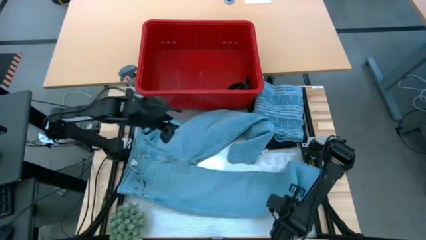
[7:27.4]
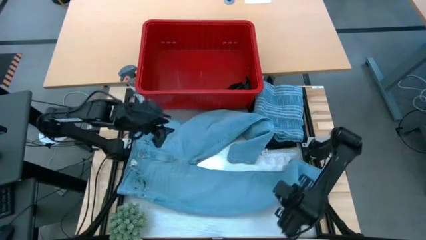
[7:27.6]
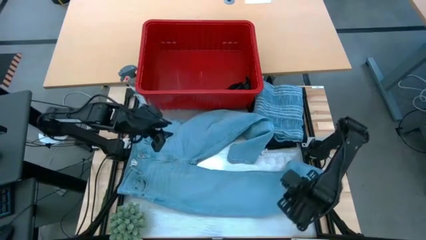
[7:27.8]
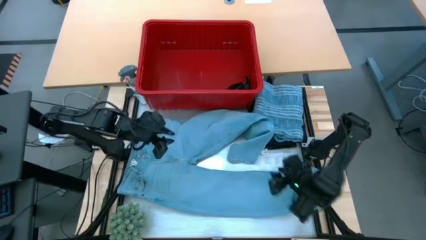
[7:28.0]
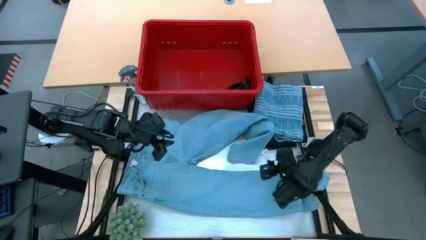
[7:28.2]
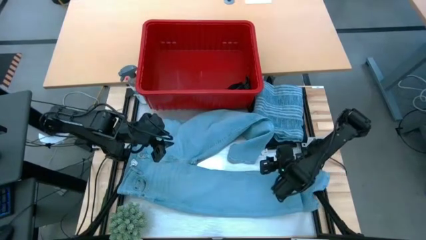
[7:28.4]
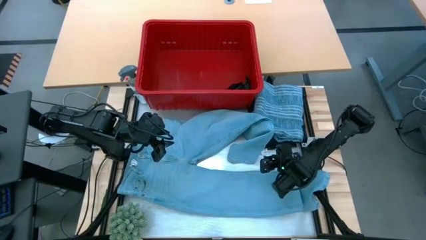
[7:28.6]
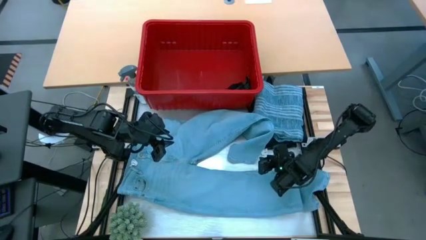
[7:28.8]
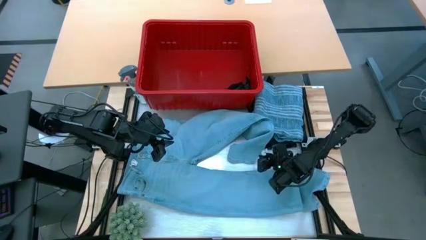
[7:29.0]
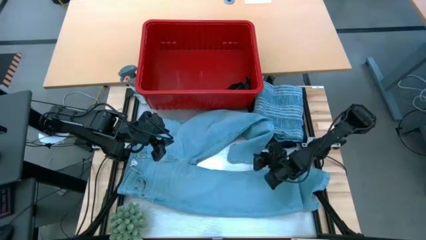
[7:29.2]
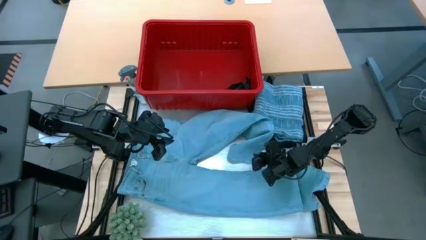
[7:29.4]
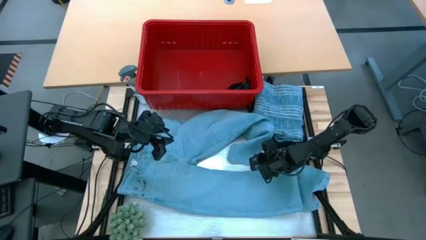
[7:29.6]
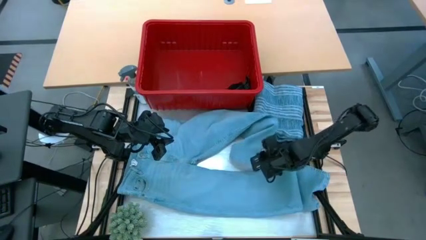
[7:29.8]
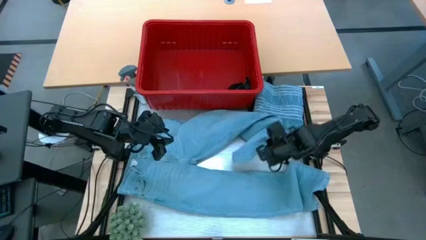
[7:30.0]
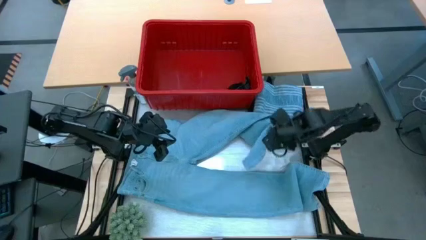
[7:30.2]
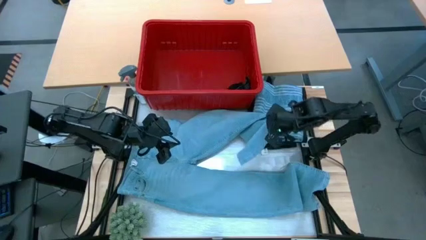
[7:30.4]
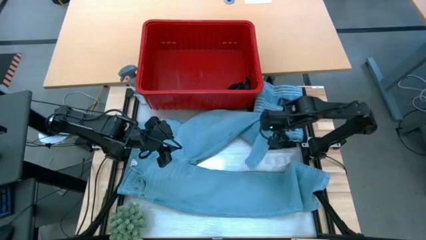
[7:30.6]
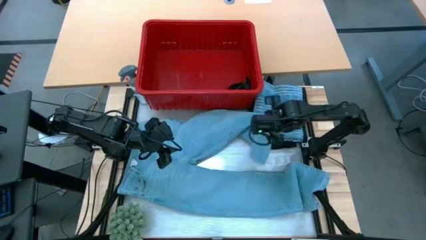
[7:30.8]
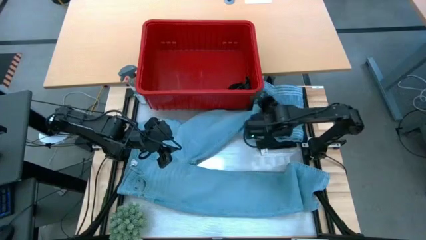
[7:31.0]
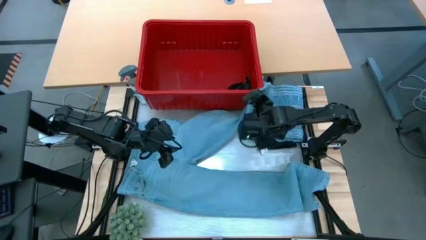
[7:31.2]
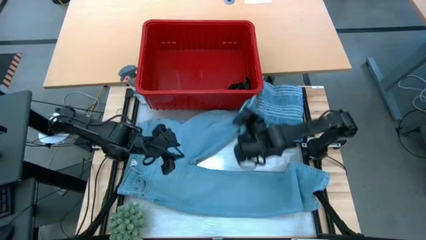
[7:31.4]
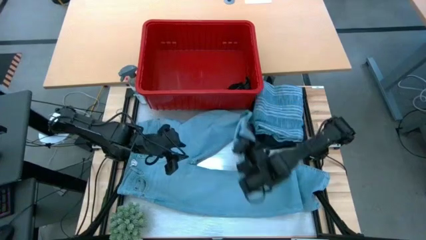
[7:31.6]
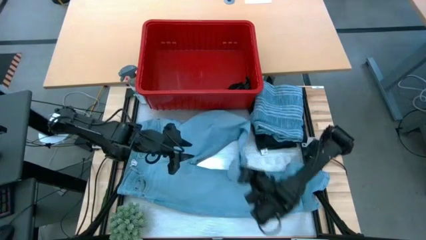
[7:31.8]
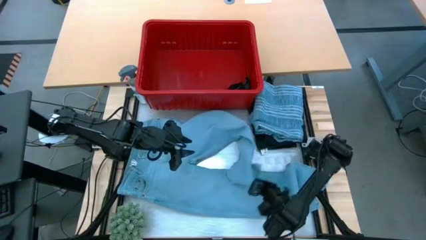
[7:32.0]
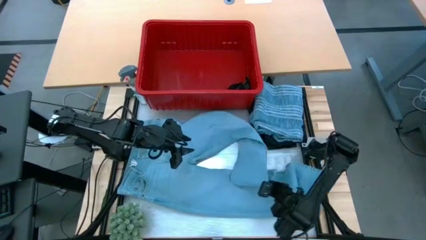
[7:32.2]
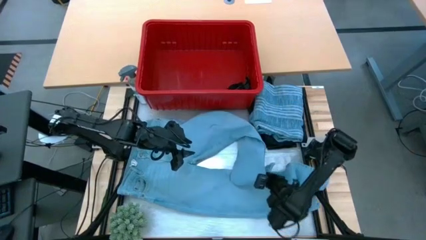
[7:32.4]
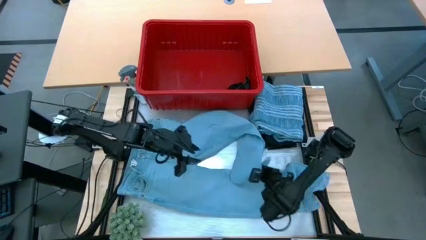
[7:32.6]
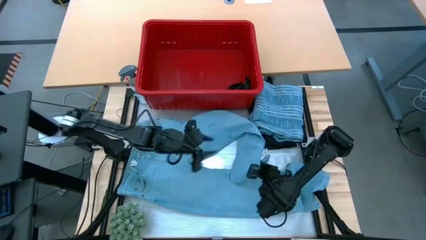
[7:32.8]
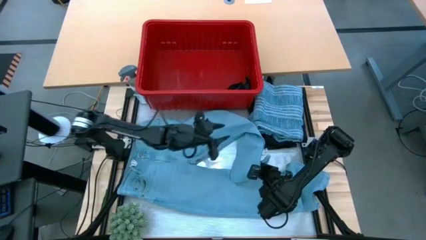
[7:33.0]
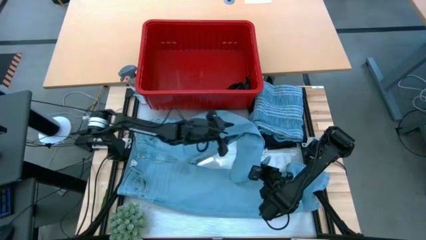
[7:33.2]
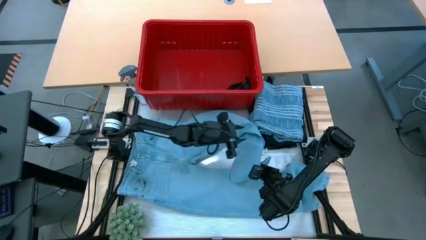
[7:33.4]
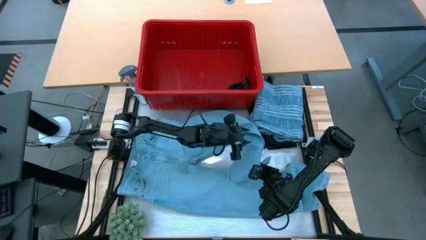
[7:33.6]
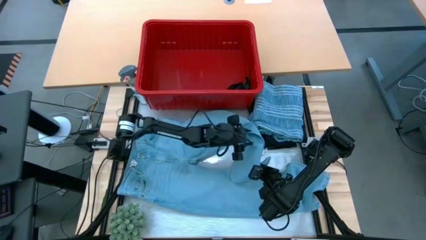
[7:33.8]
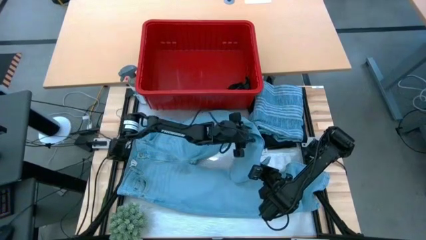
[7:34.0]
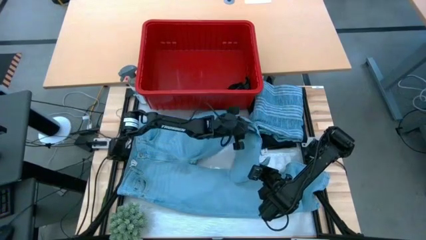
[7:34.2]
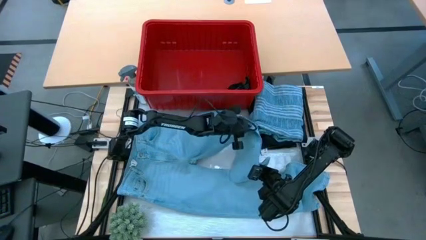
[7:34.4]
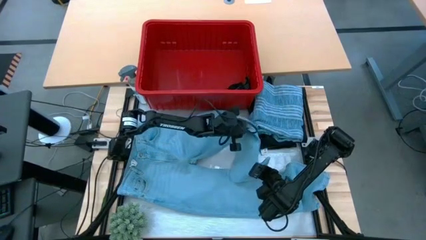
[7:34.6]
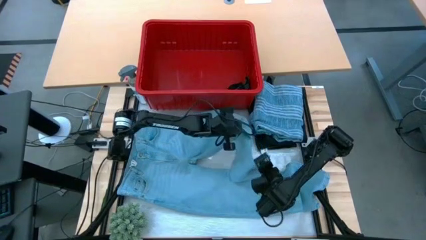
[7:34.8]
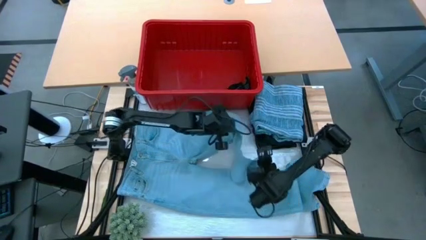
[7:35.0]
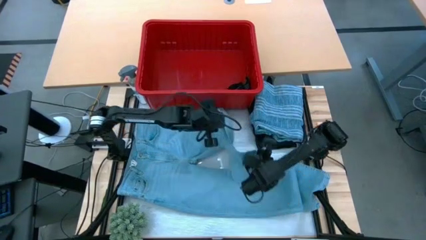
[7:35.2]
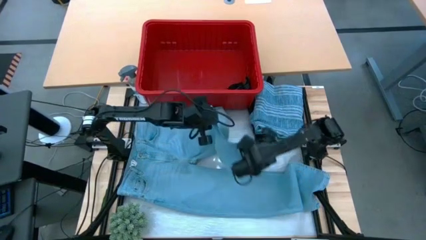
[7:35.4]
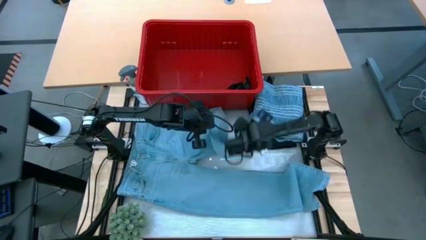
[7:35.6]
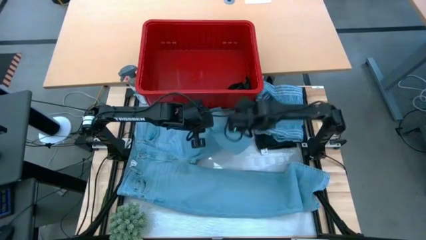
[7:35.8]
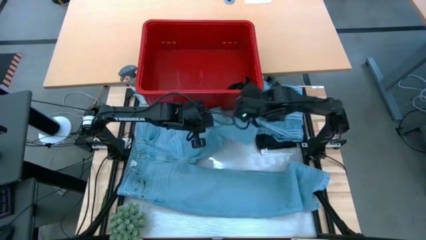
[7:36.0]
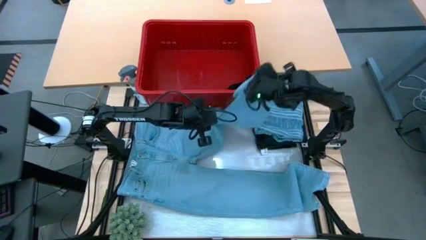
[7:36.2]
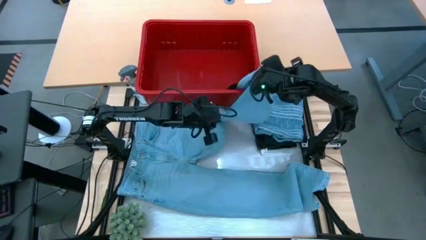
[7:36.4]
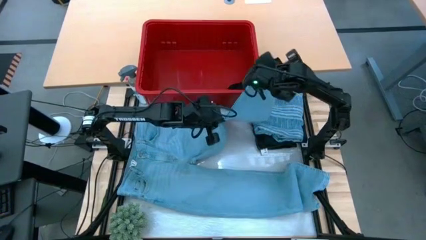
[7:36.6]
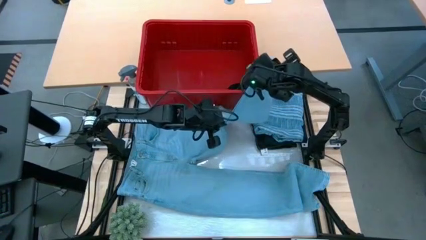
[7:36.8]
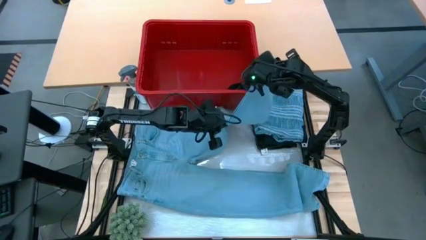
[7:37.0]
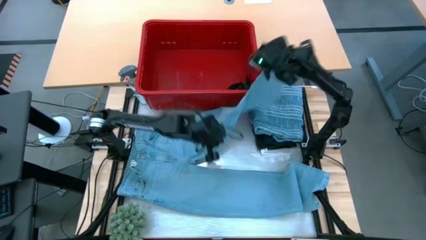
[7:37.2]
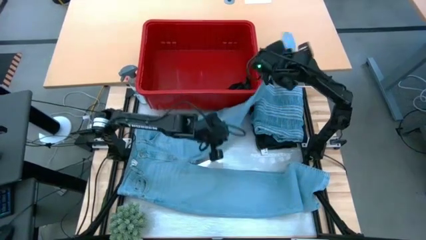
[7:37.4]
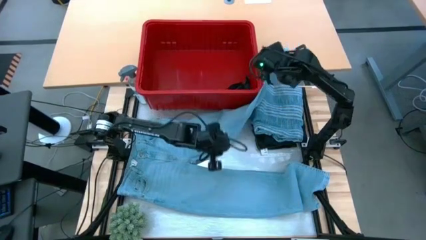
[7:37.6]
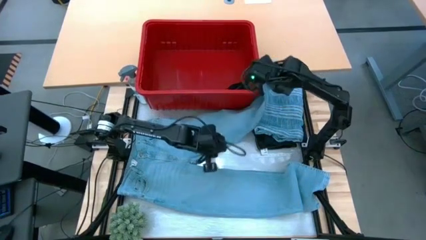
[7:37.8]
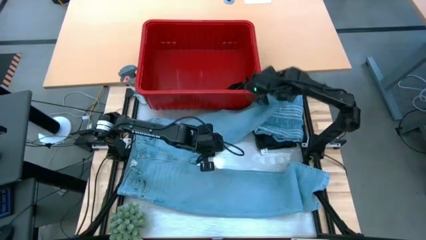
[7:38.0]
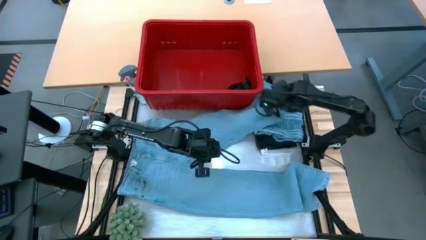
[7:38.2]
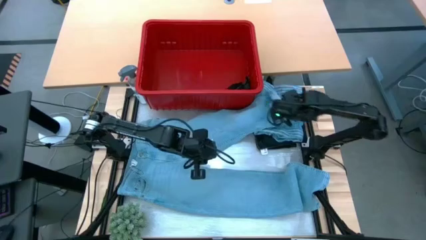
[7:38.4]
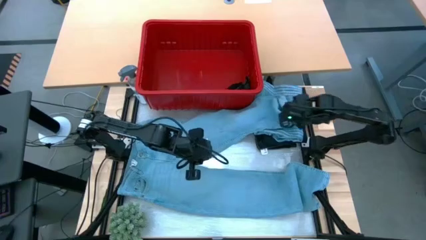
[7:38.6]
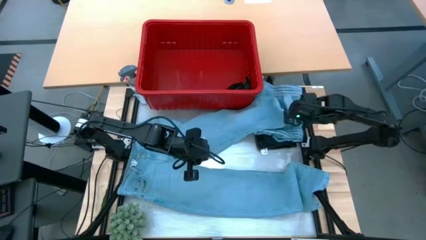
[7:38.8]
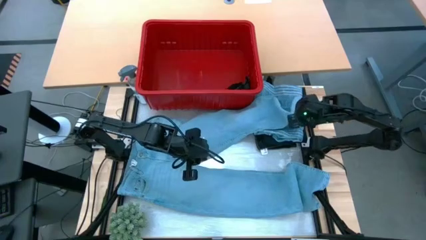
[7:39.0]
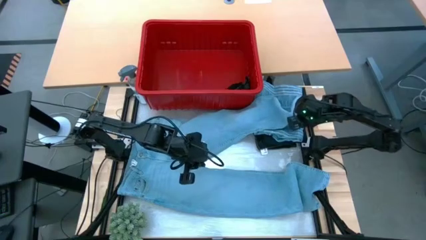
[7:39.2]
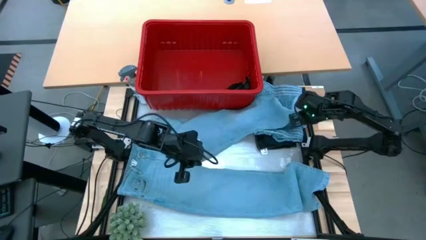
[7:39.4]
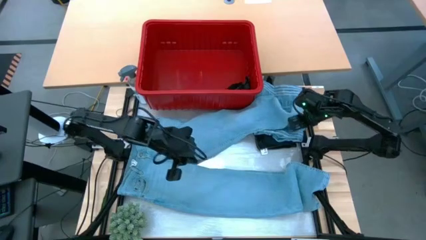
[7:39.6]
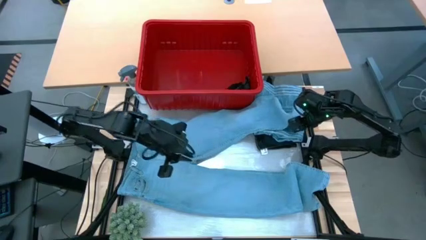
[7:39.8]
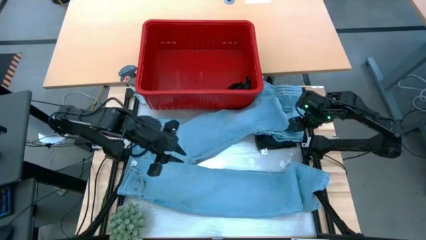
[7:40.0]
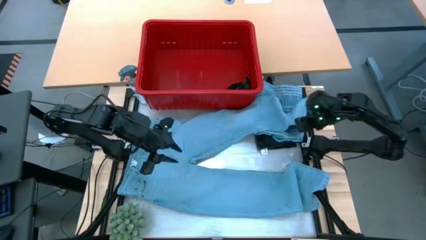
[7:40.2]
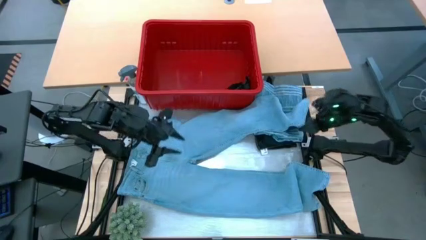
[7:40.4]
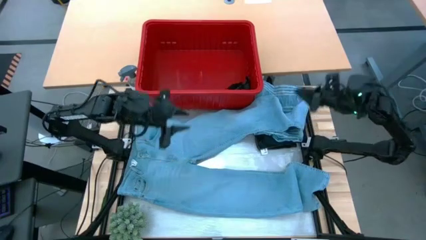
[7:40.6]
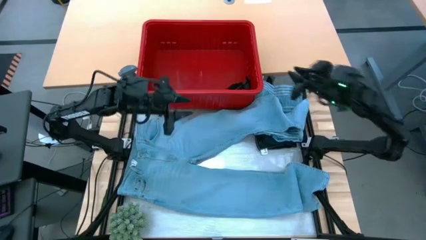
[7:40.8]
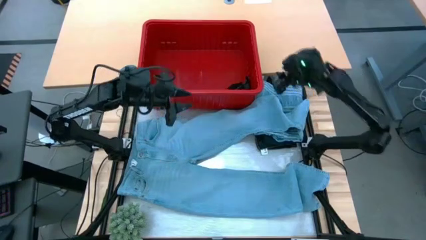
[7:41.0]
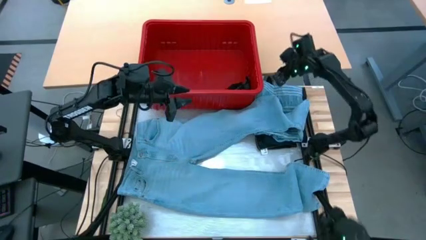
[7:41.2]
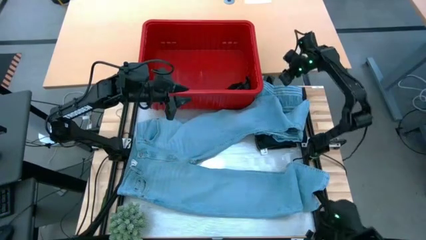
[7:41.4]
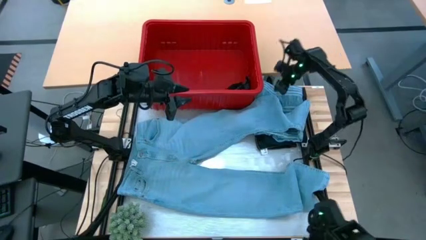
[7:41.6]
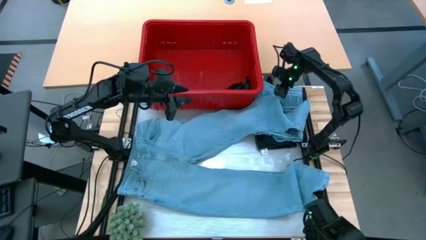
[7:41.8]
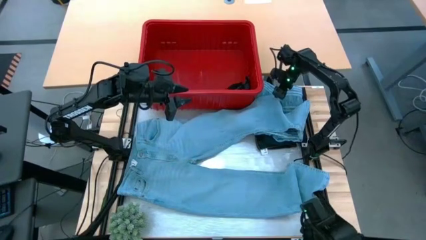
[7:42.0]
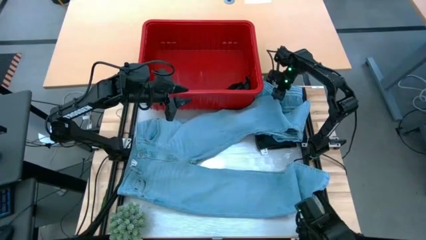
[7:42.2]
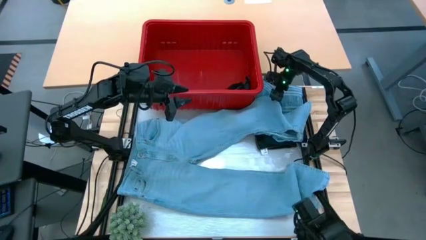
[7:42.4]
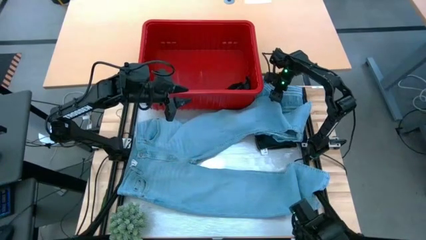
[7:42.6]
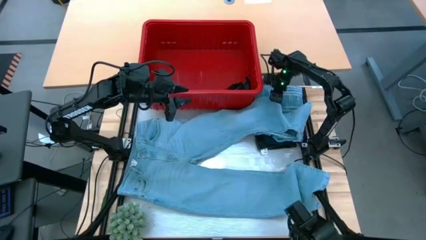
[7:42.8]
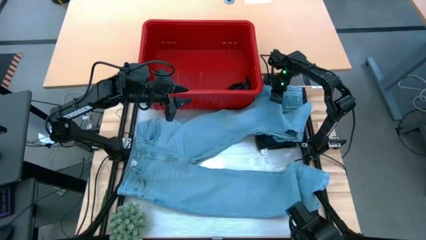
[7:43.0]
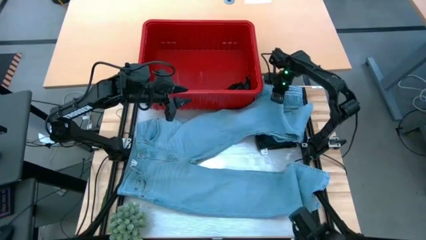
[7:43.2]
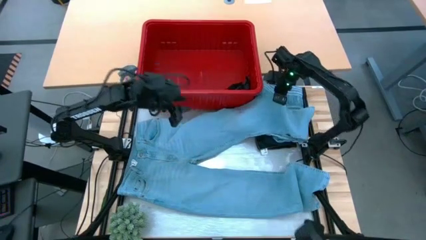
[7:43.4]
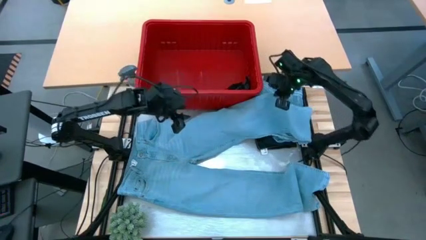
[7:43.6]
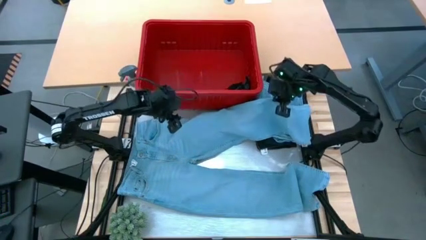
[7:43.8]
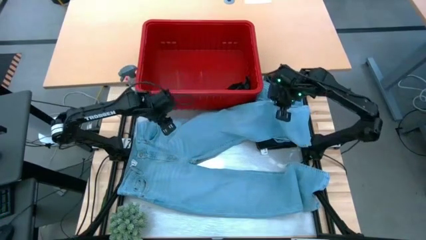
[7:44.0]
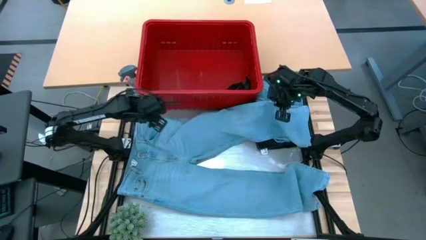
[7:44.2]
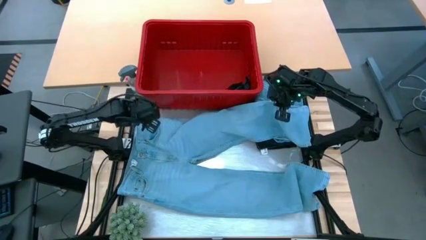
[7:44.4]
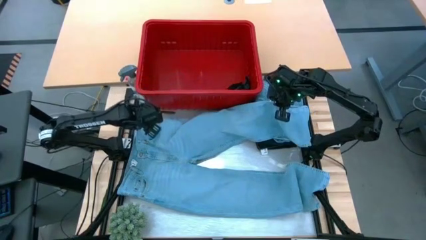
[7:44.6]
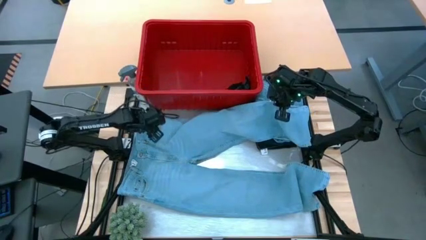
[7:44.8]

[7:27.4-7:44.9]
Task: Fold Laundry from Bin
Fold the light blue pants
